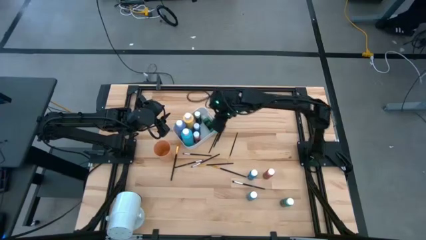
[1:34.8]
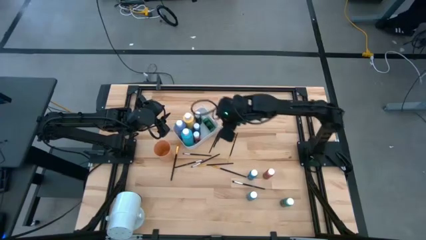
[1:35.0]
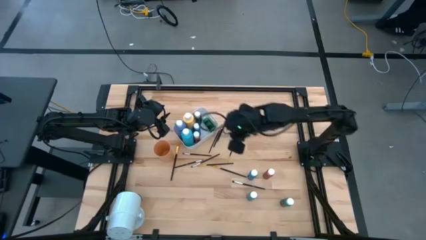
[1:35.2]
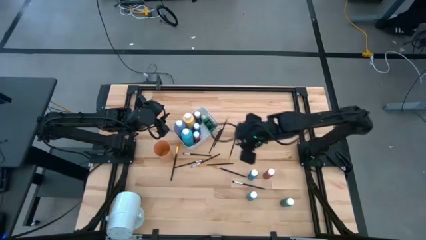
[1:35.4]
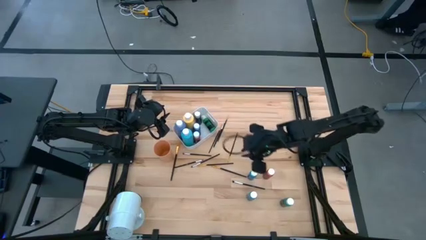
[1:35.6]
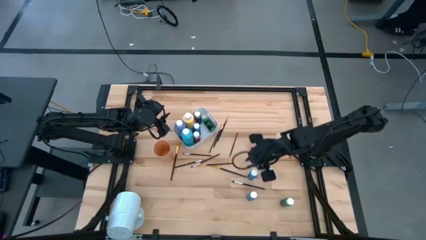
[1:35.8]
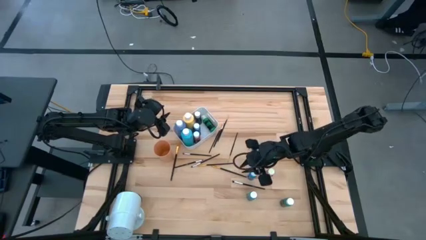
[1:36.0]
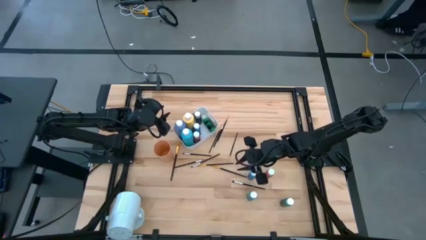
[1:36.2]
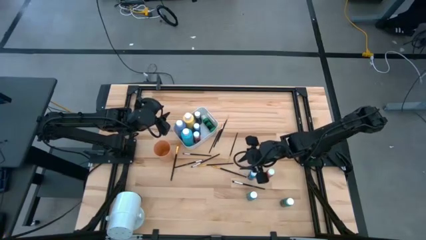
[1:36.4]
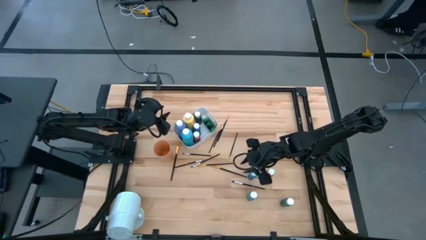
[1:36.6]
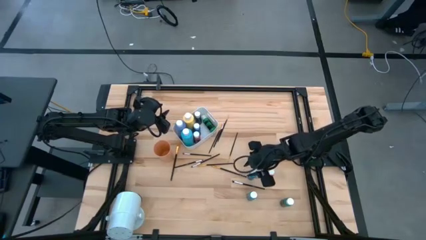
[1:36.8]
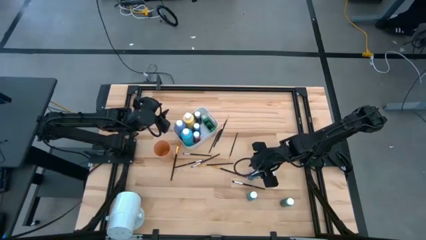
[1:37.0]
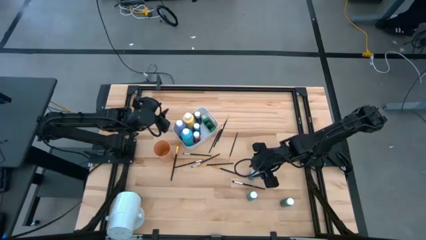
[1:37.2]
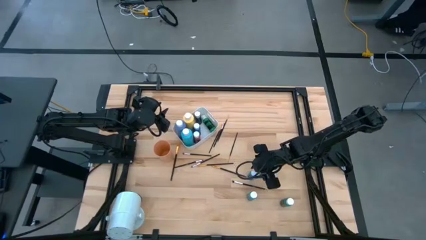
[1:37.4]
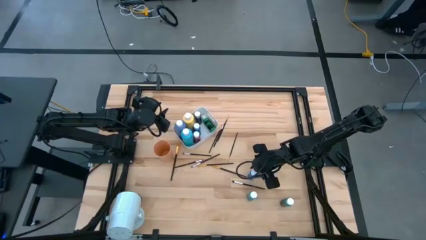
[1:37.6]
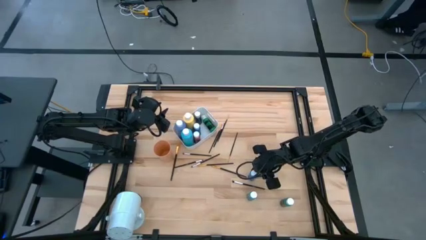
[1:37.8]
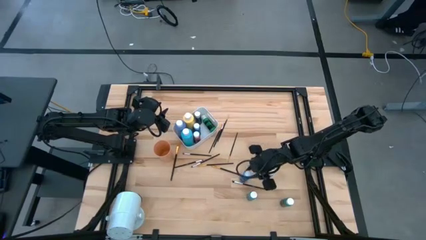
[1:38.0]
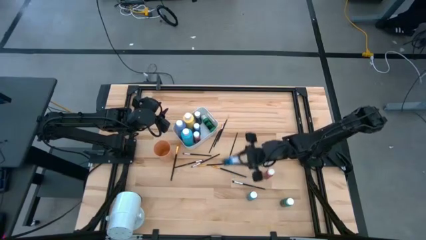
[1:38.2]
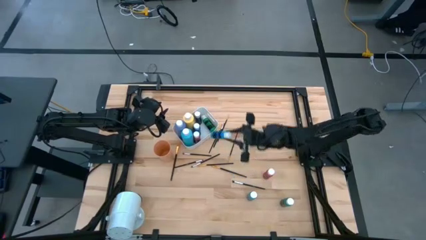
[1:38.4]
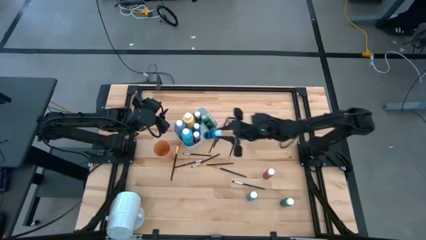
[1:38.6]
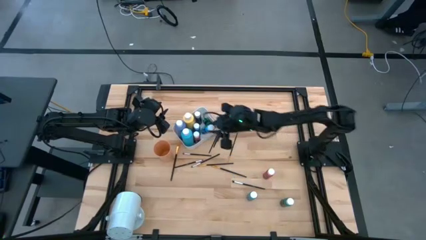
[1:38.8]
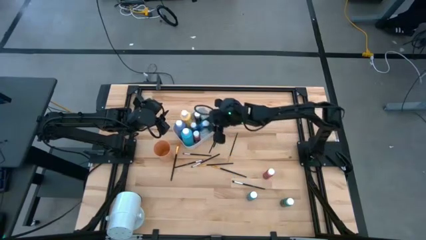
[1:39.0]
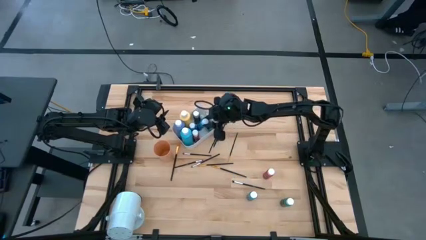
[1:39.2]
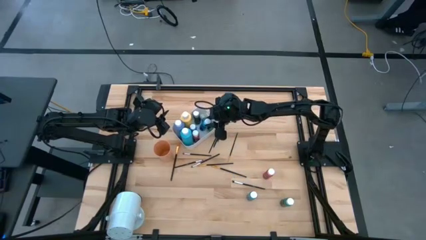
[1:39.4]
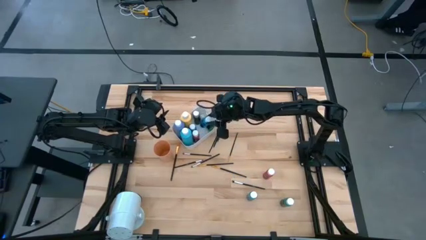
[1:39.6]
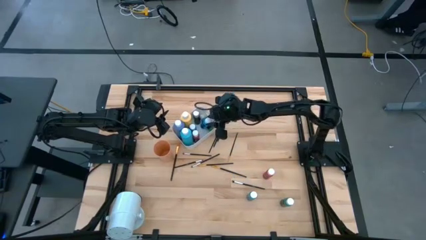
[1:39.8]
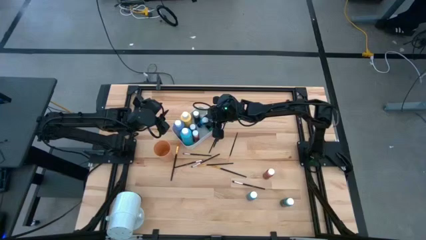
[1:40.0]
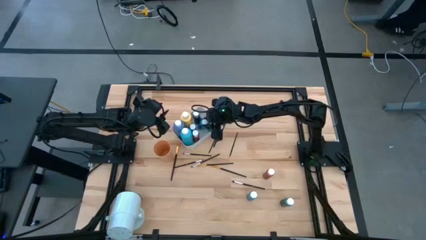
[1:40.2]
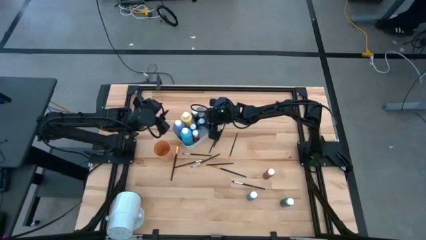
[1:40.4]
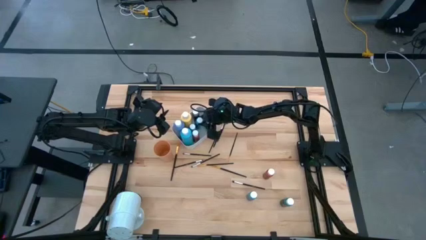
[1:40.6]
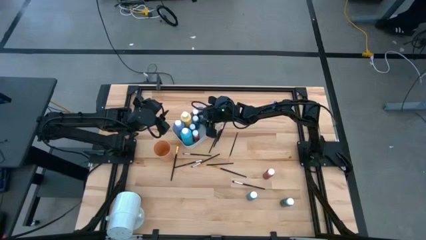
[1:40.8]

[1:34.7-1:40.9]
Task: Pick & Place Paint Supplies
Put the small blue paint bottle into the white bin

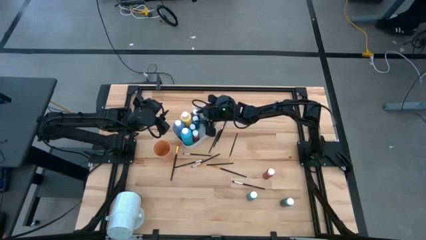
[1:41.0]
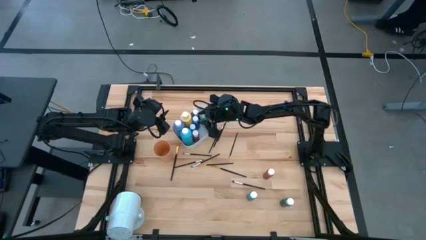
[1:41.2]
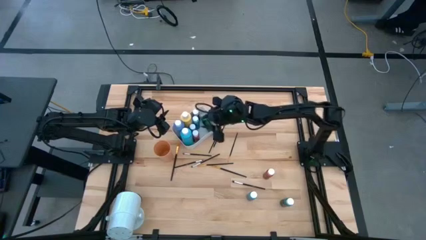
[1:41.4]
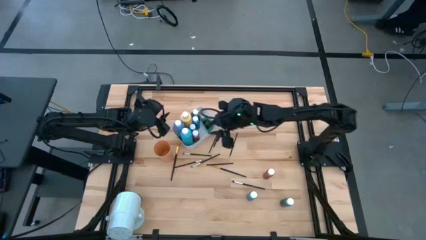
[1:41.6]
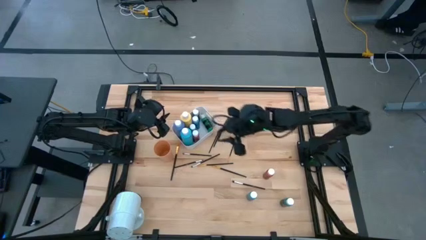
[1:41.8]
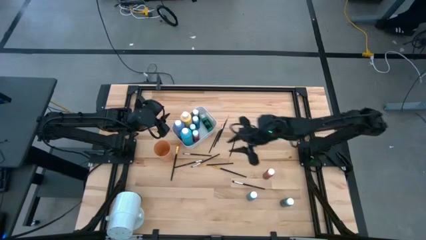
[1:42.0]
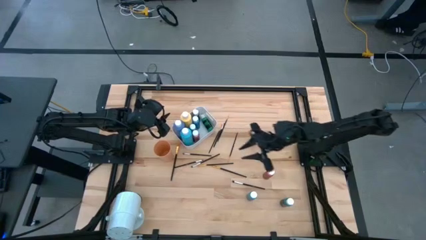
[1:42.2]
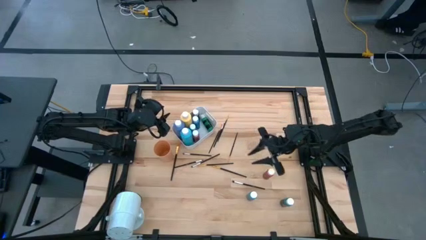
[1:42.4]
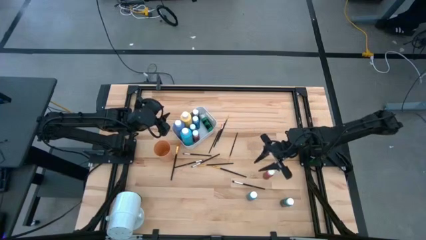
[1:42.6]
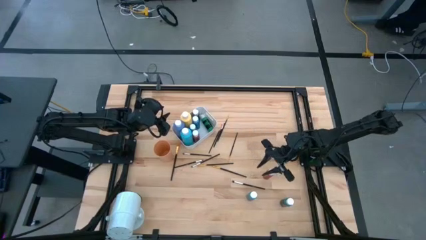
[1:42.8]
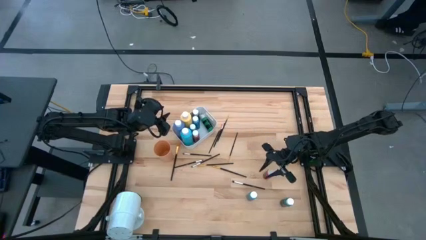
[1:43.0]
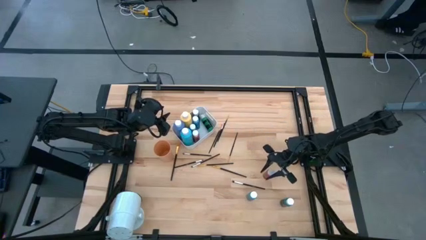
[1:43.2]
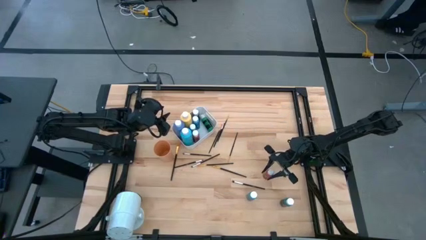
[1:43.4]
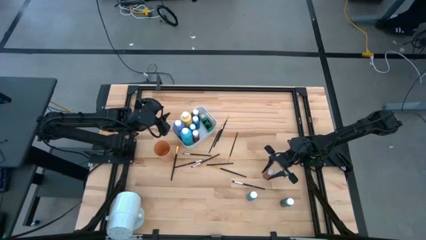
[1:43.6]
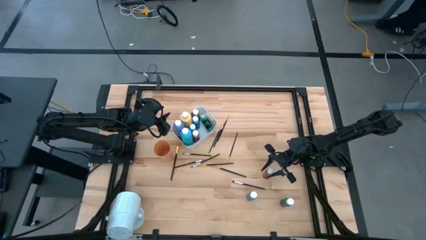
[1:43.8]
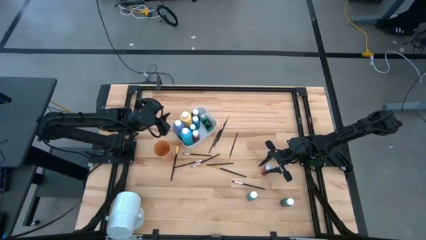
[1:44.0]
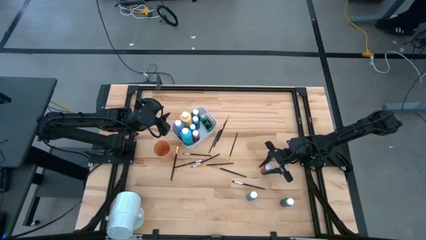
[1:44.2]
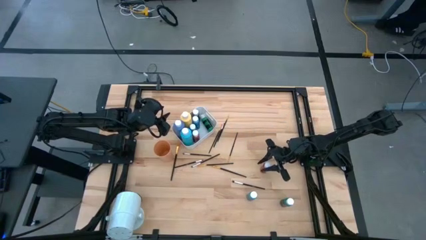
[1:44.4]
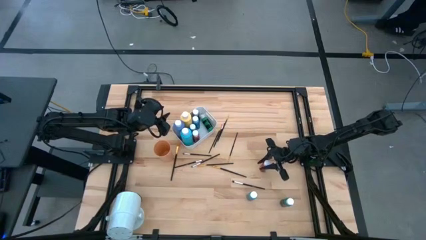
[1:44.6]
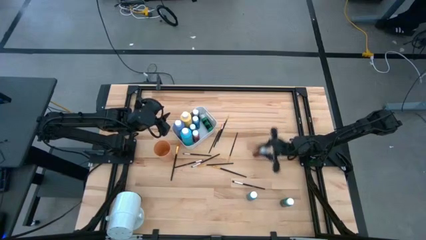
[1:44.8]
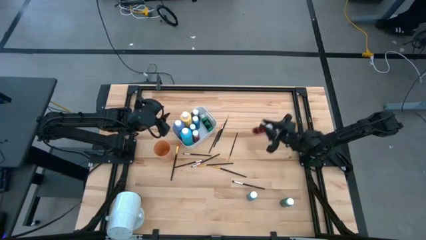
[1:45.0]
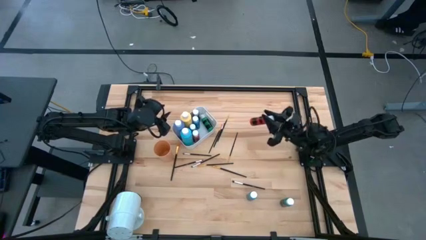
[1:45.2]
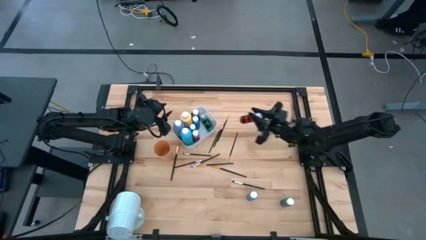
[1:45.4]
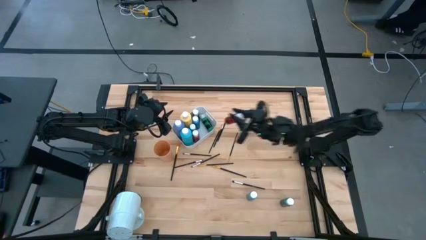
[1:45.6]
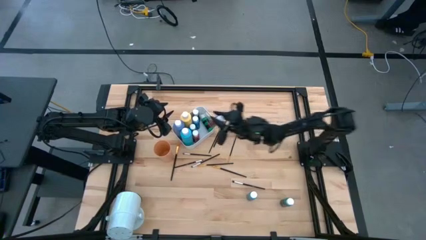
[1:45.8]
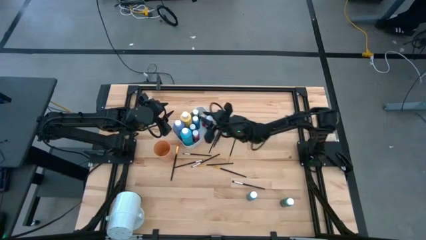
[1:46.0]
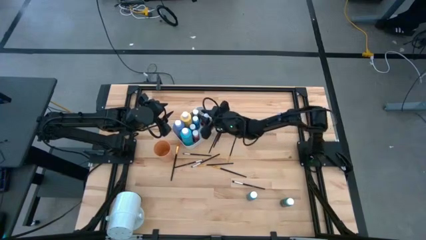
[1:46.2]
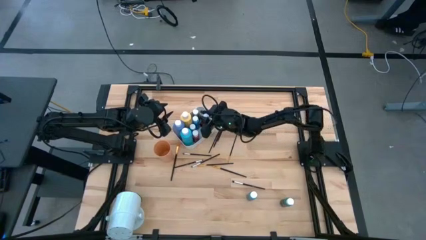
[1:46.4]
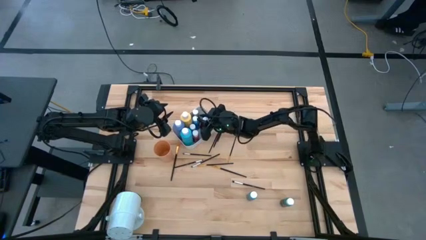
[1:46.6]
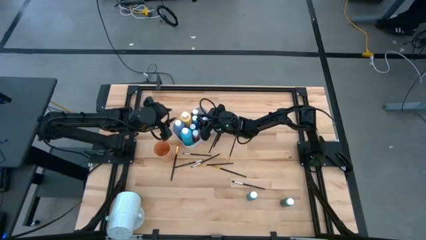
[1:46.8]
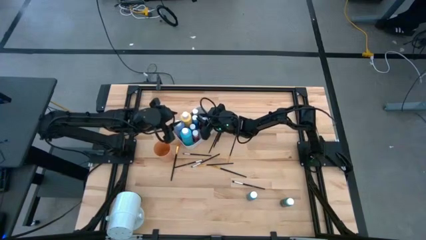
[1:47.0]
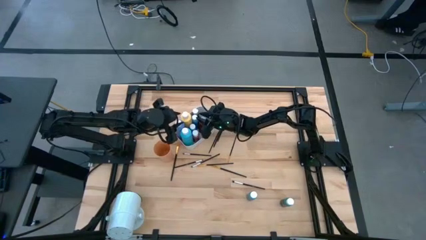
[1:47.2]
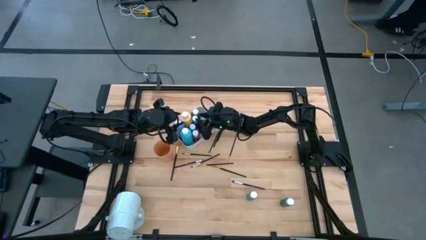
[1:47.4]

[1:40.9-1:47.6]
Put the orange paint bottle into the white bin

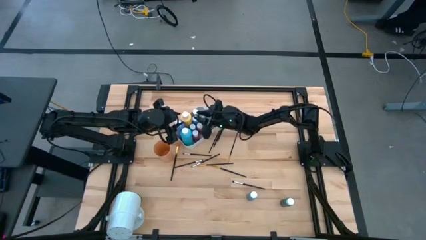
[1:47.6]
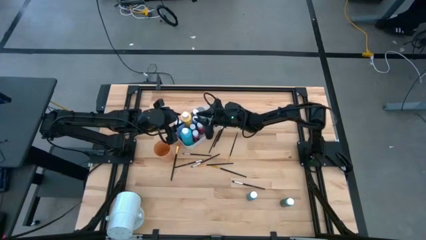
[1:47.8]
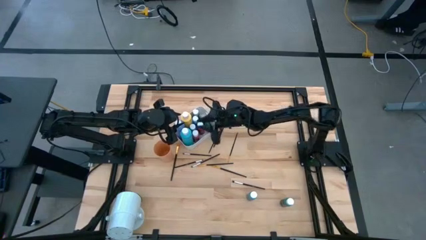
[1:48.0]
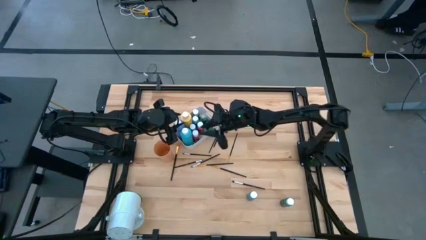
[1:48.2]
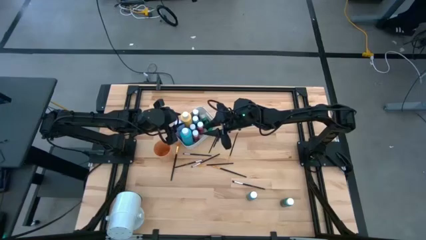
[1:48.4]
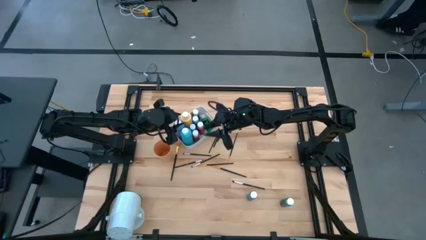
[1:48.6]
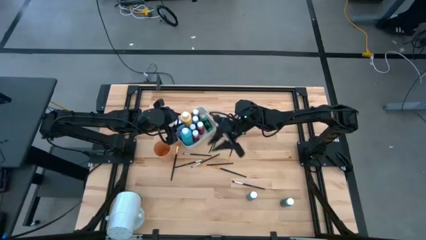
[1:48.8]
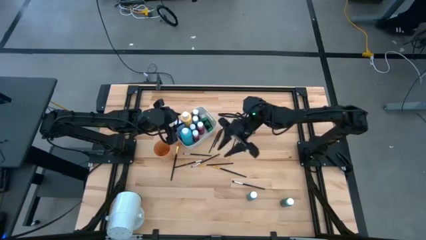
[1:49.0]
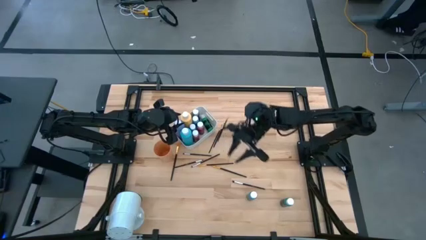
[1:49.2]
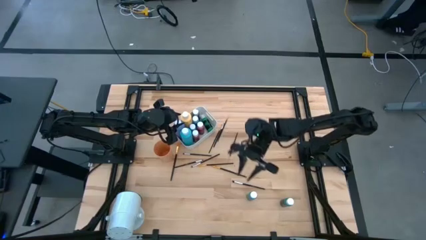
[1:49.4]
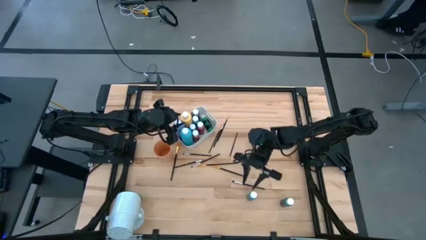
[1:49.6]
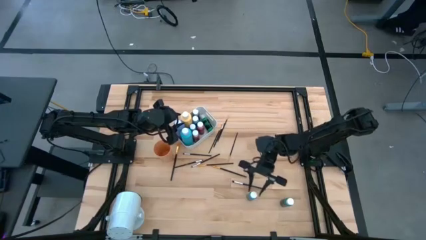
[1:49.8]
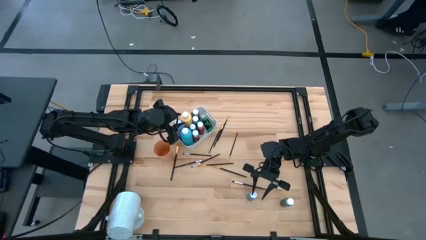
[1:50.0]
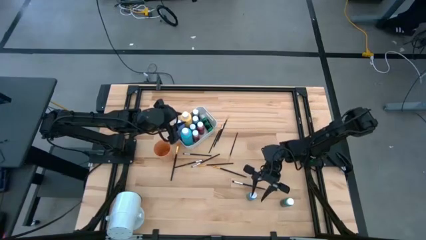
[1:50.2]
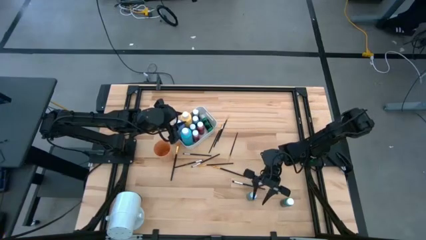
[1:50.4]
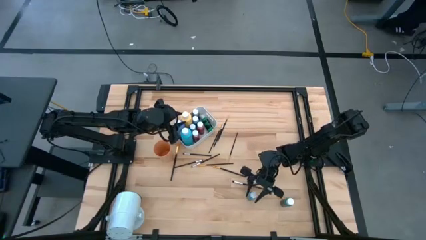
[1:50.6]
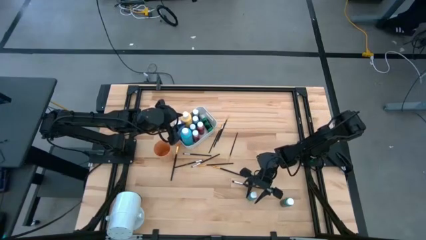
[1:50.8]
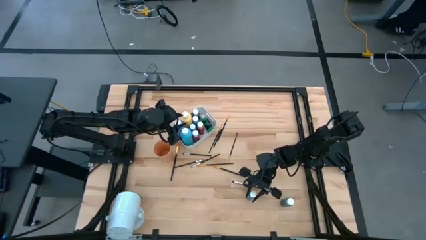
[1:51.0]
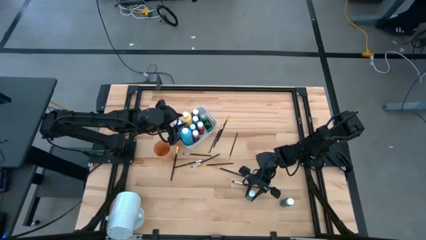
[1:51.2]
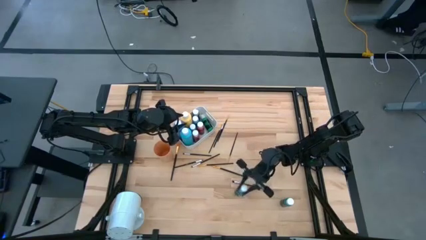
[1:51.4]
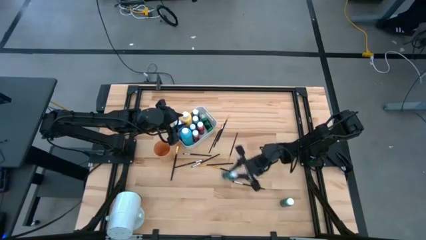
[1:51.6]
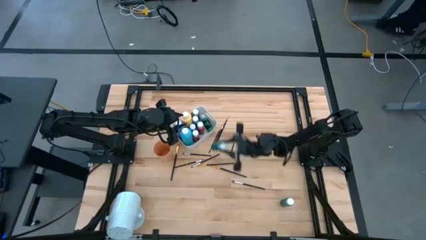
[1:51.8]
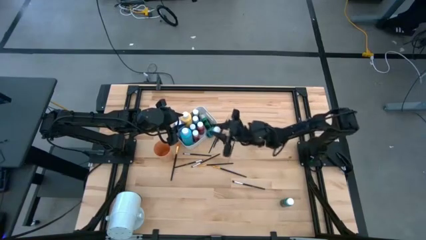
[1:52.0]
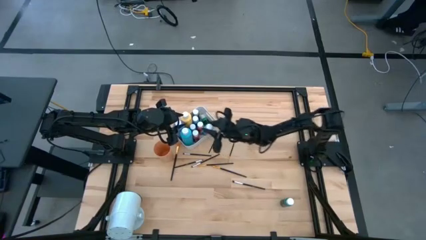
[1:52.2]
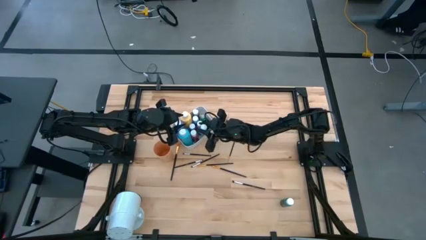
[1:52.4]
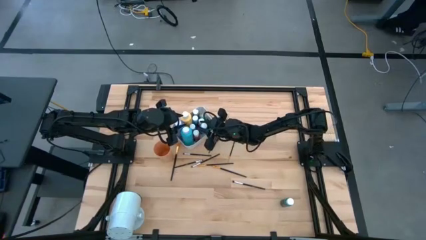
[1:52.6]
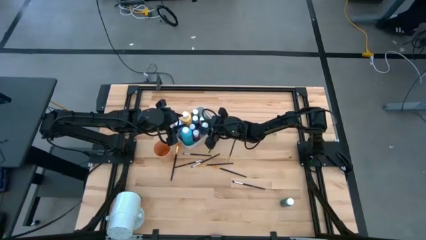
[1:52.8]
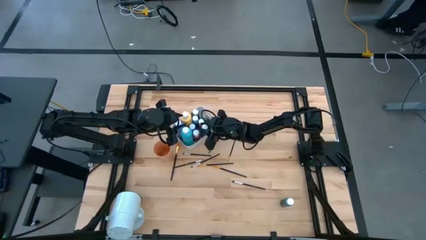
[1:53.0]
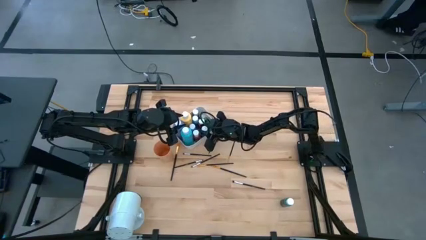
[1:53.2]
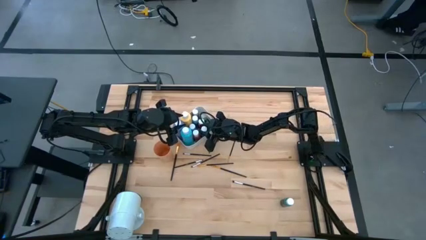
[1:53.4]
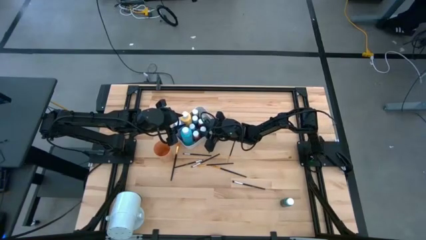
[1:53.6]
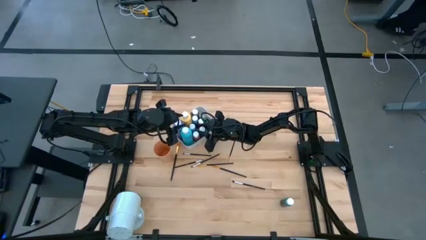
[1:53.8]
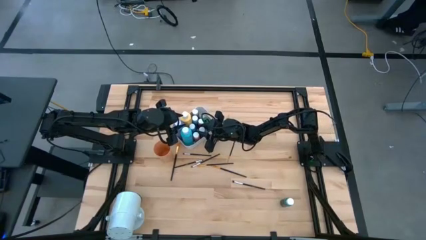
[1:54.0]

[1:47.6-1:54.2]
Put the left small light blue paint bottle into the white bin
